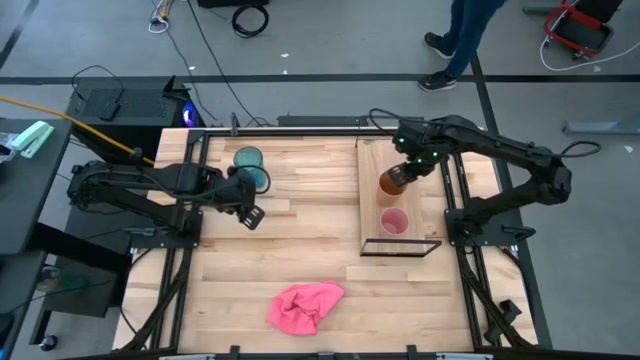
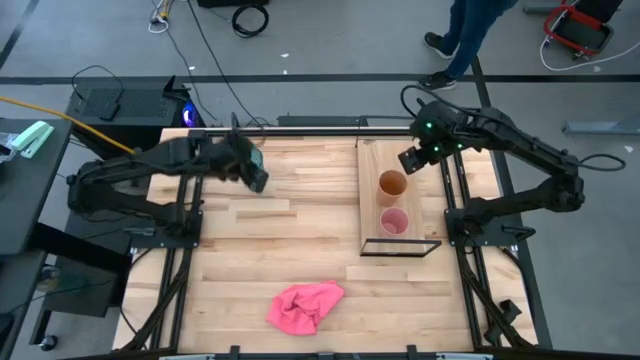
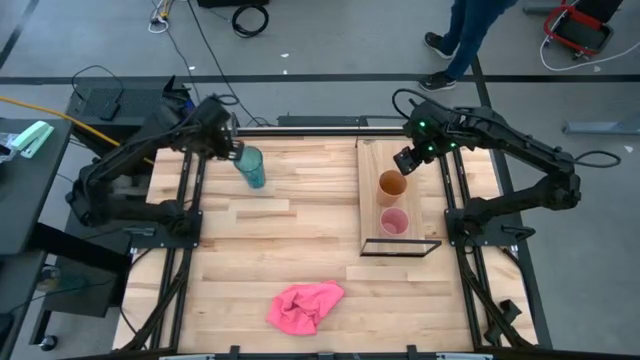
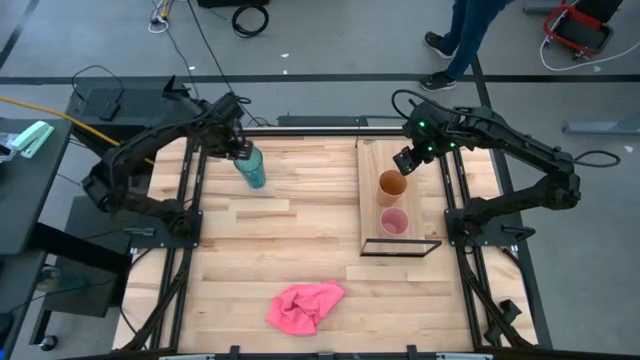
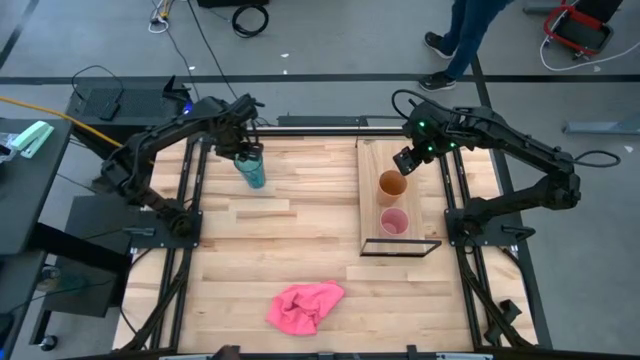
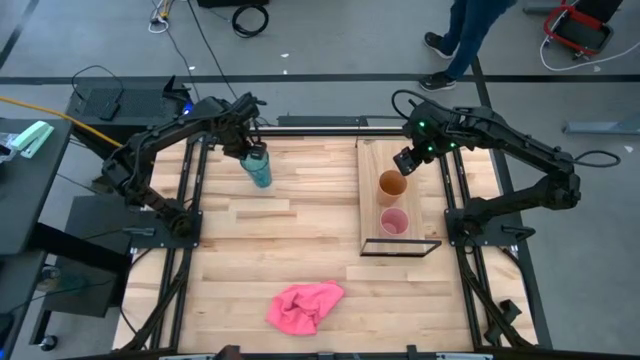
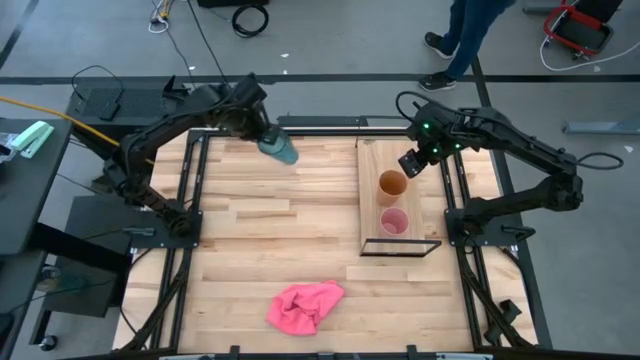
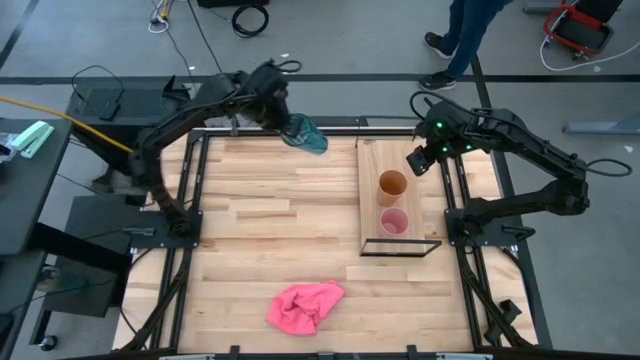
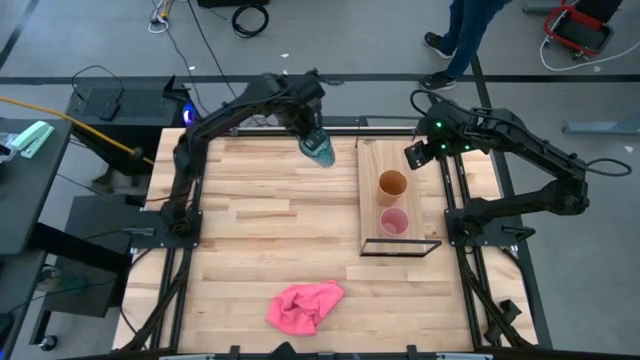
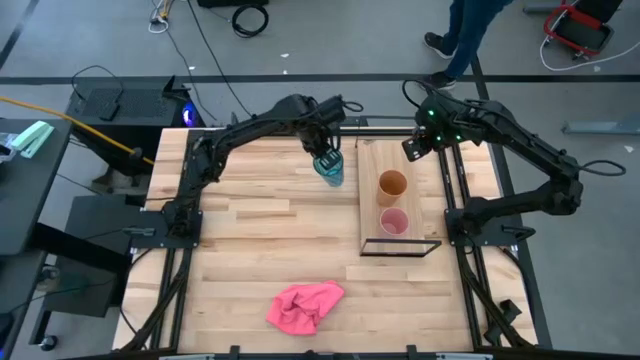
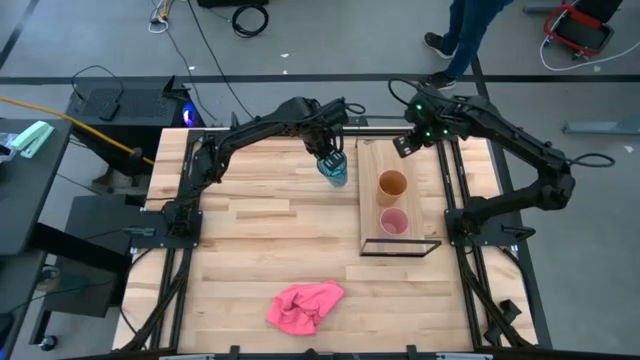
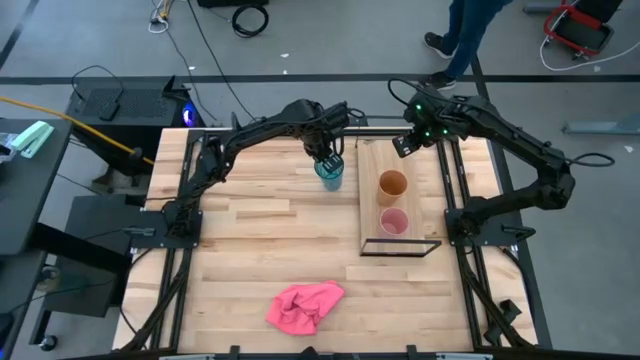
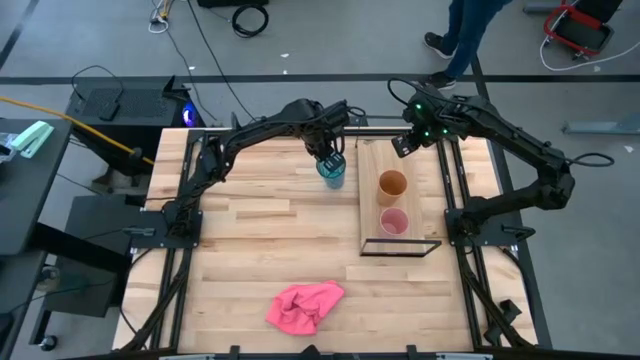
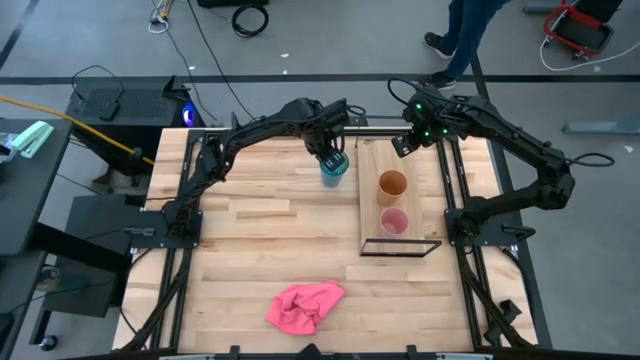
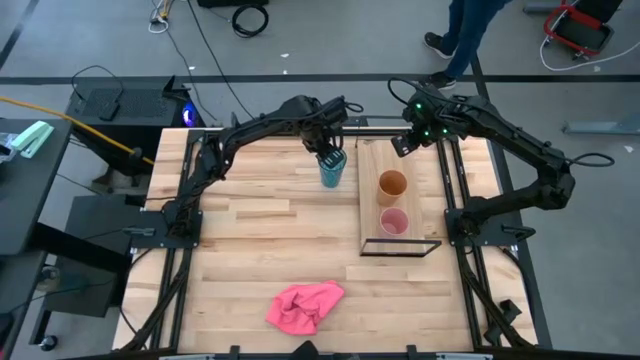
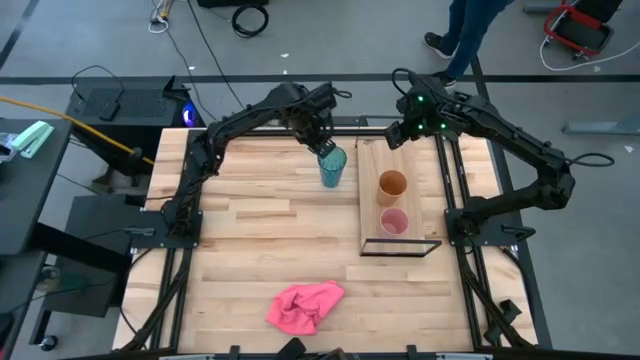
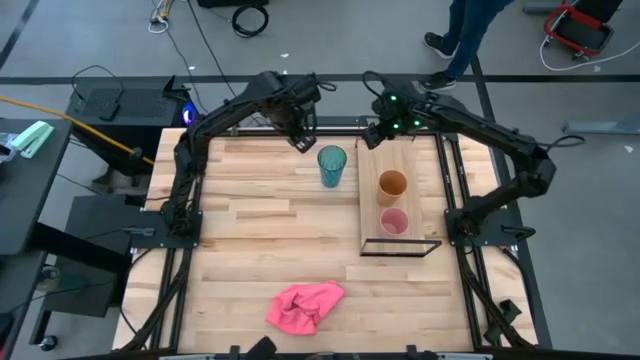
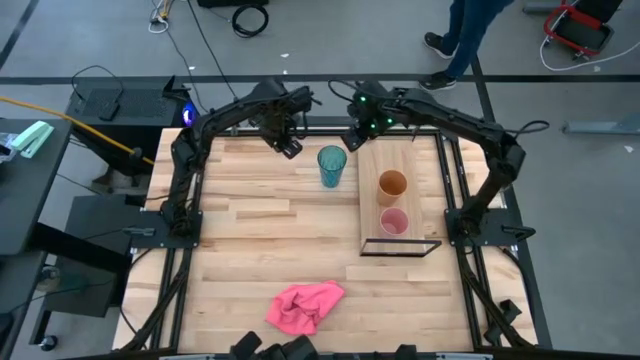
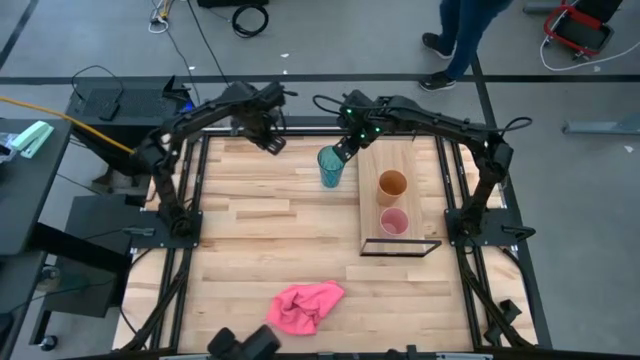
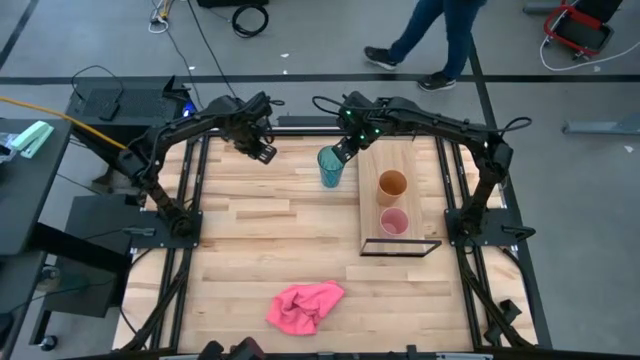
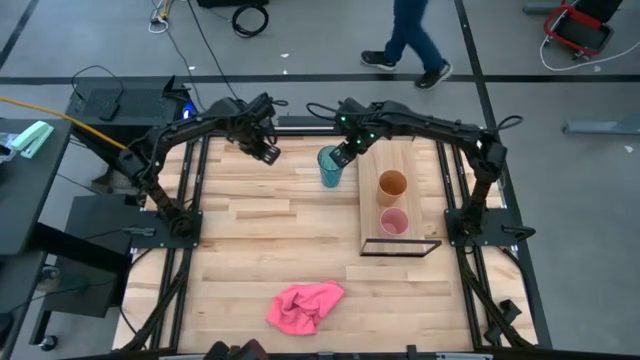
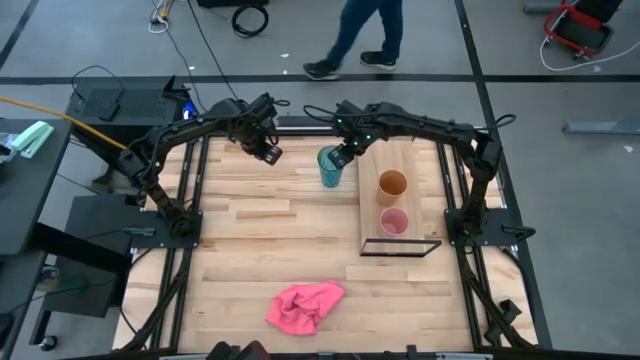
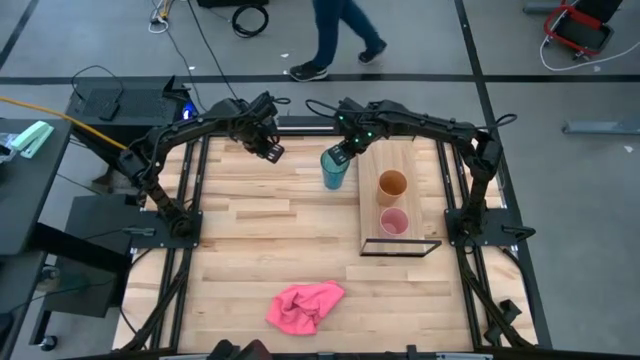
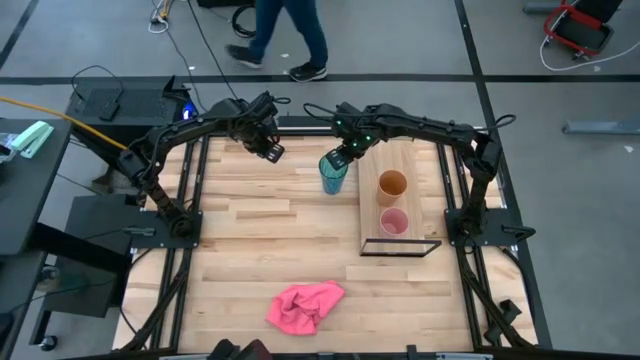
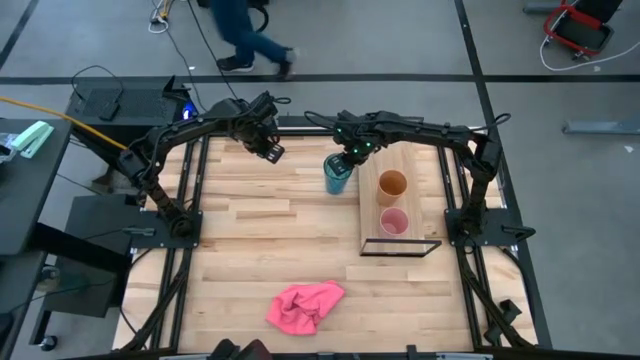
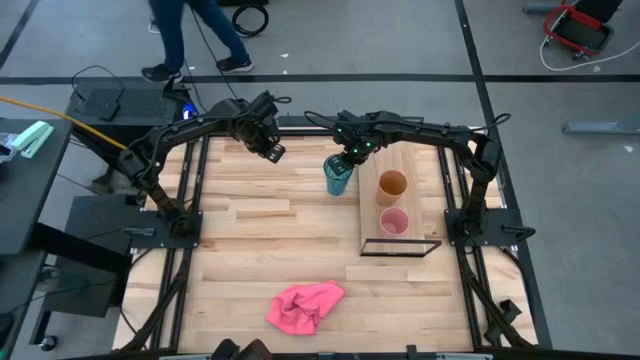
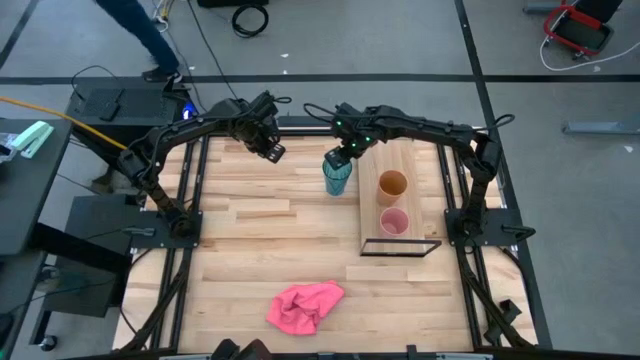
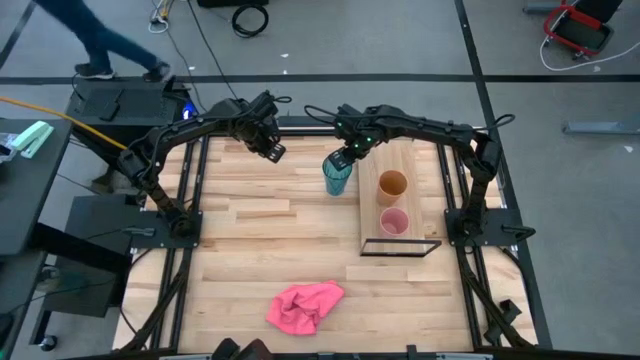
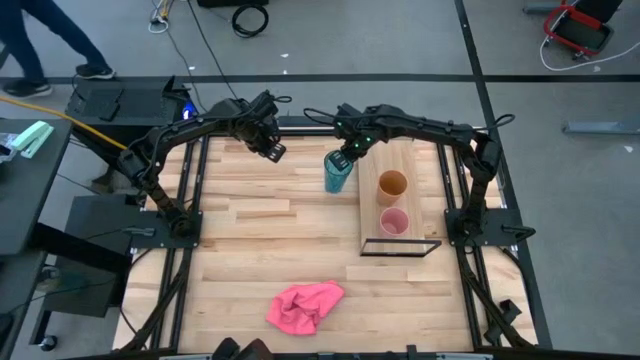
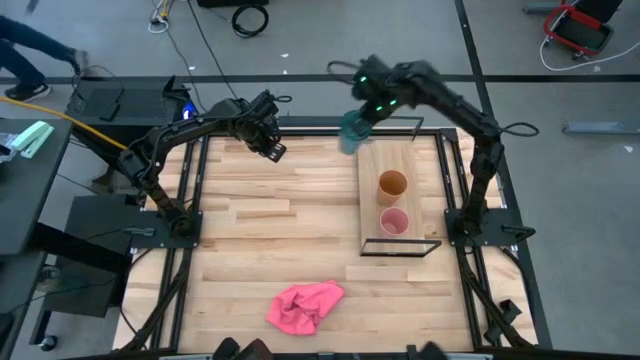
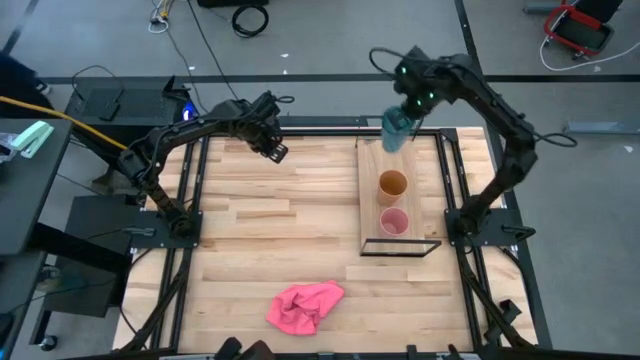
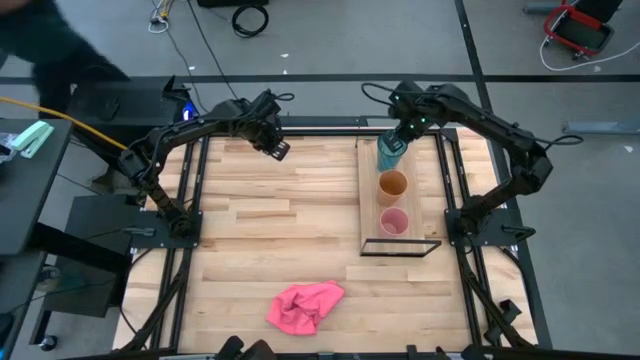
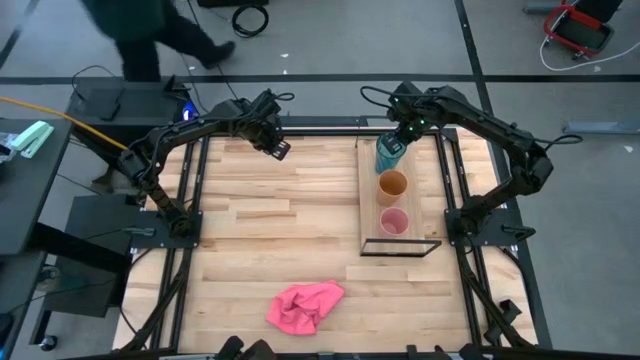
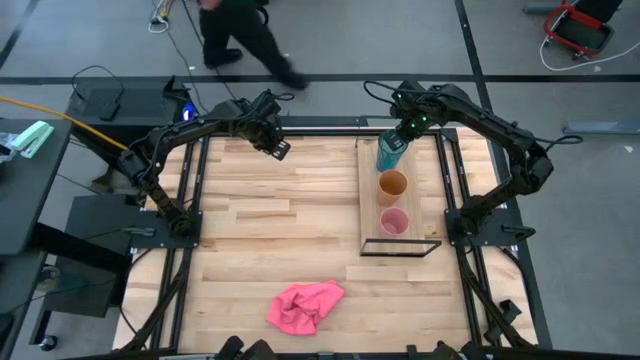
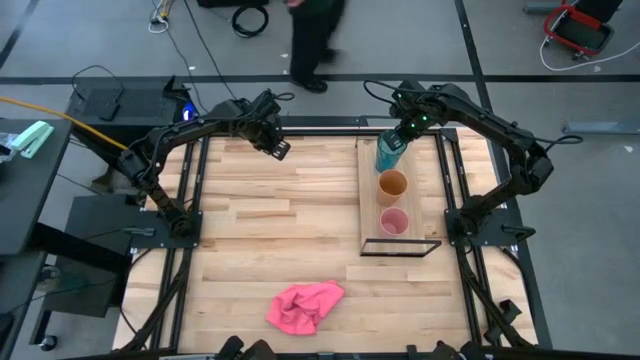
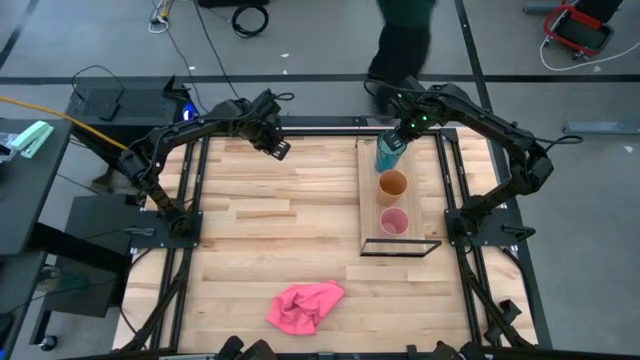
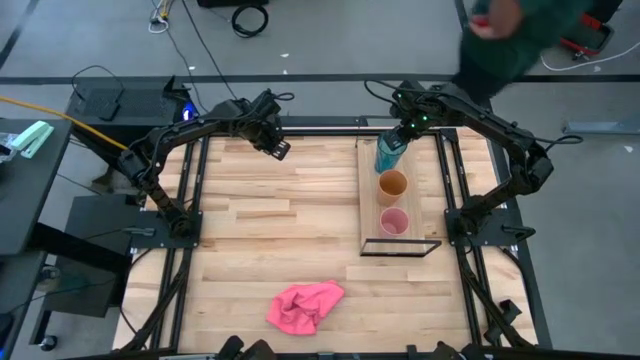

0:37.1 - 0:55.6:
Task: Stack small to large cups/mugs on shelf
Put the blue cup on the shelf

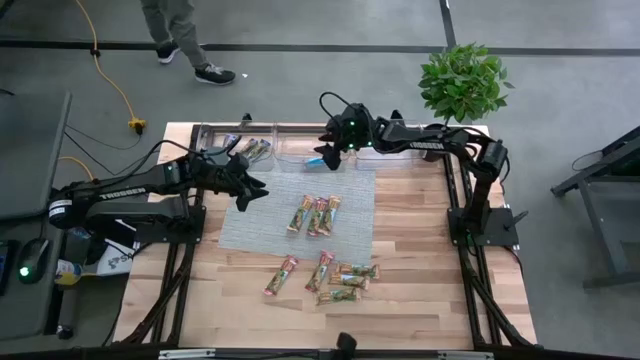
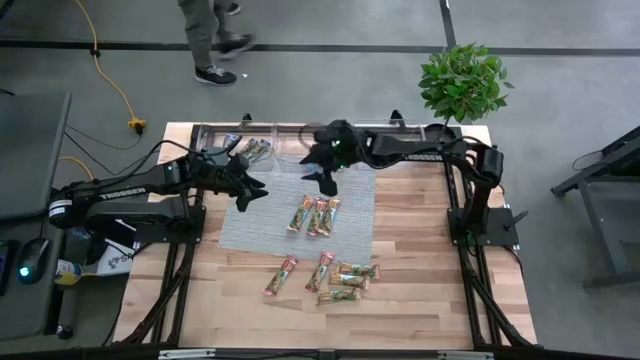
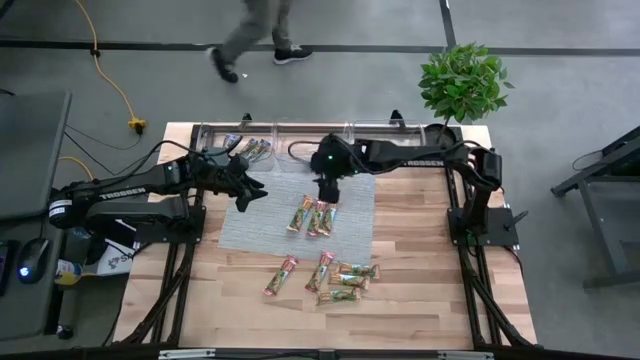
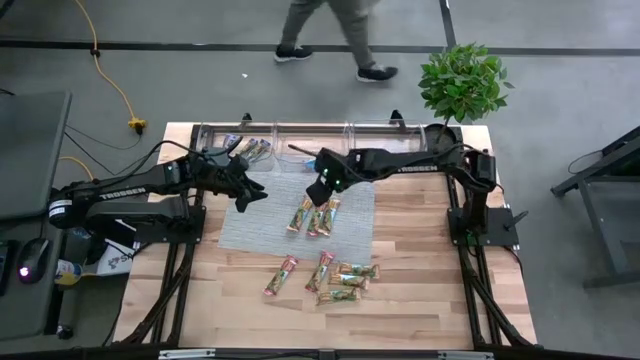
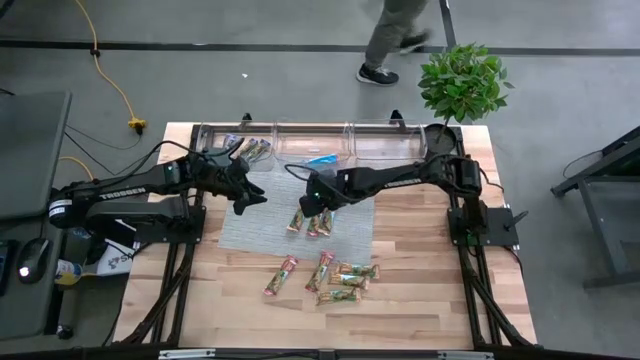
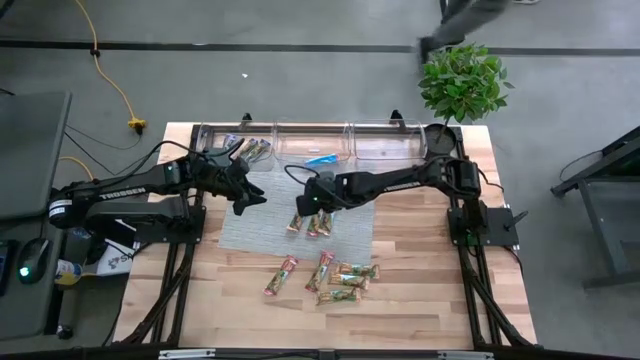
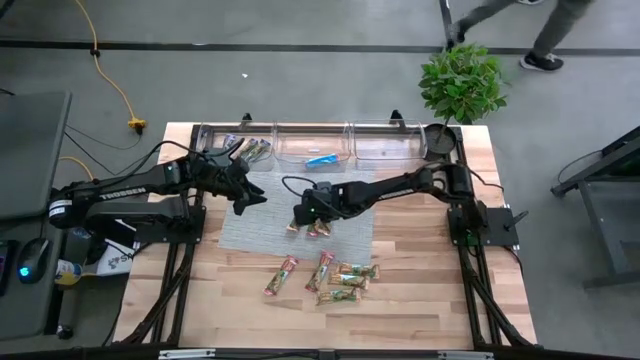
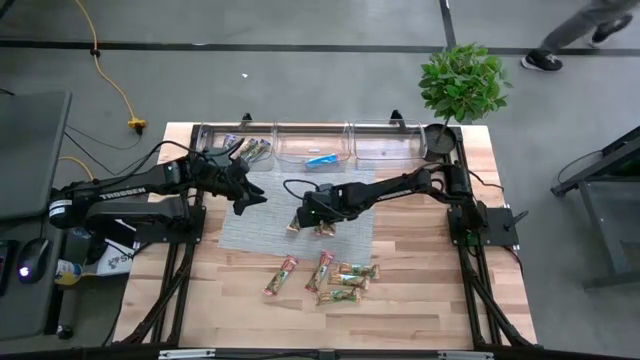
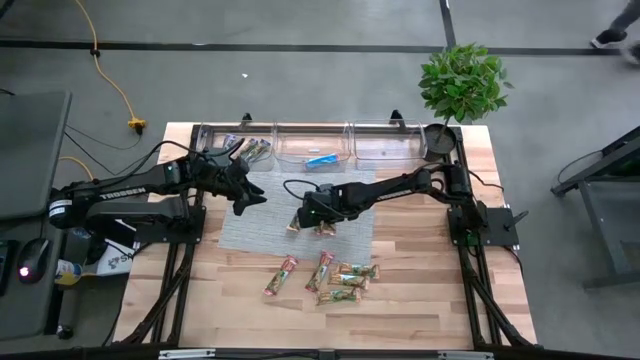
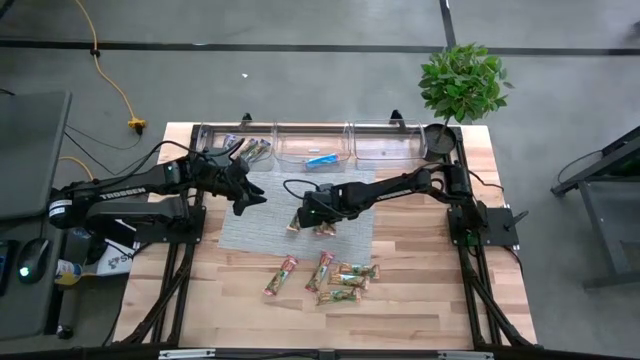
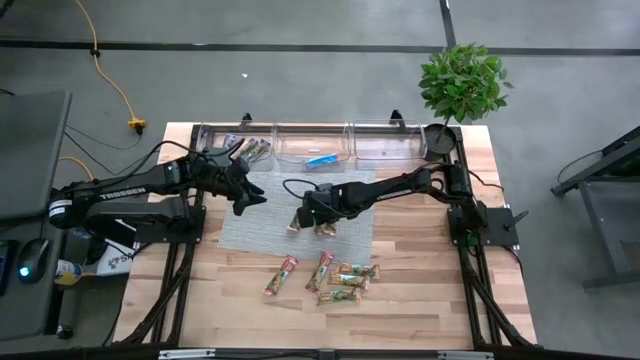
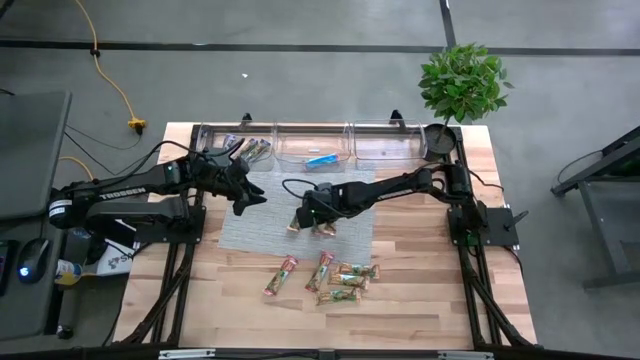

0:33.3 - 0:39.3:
Task: Pick and place Granola Bars by type
Put the red granola bar into the middle transparent bin
